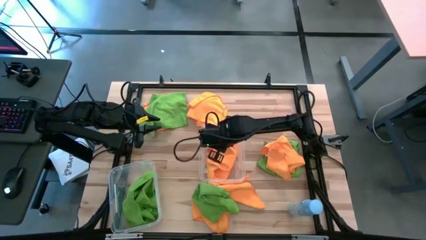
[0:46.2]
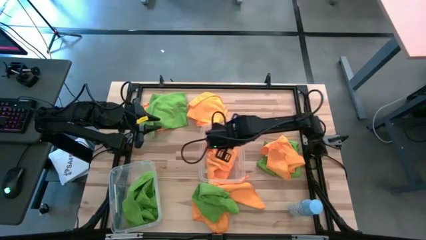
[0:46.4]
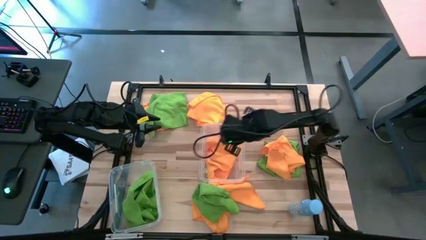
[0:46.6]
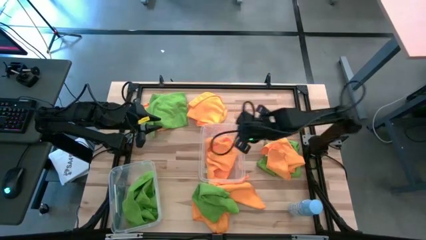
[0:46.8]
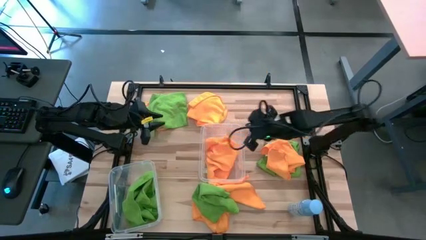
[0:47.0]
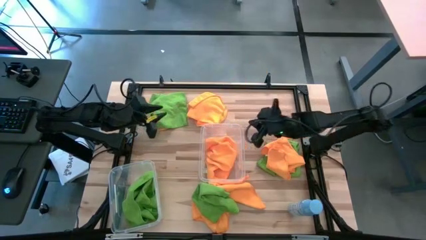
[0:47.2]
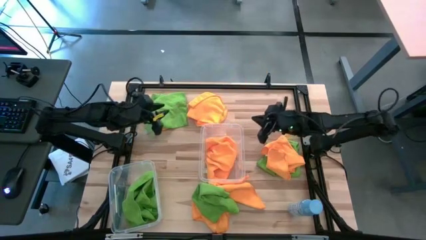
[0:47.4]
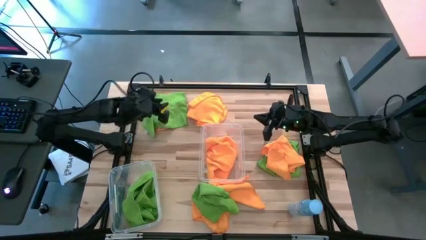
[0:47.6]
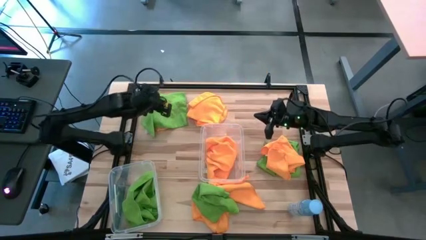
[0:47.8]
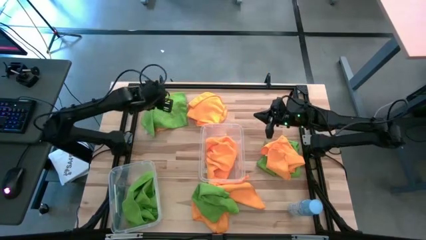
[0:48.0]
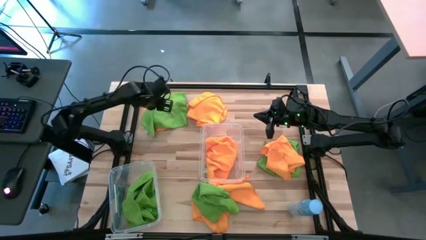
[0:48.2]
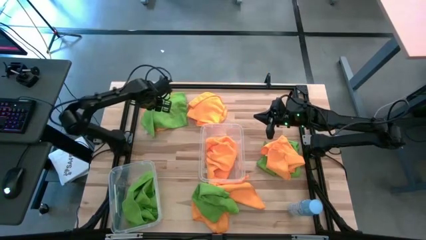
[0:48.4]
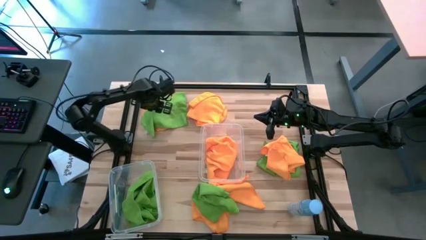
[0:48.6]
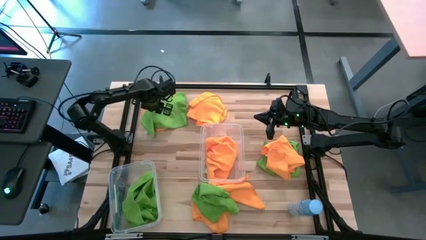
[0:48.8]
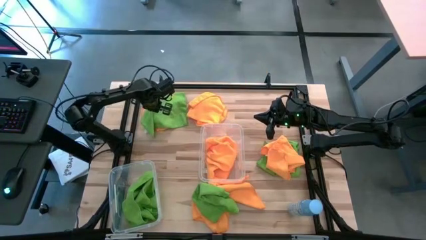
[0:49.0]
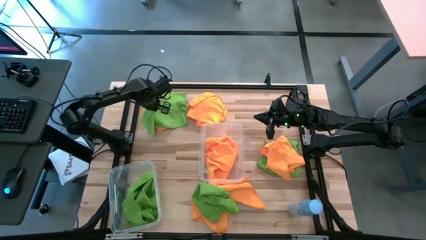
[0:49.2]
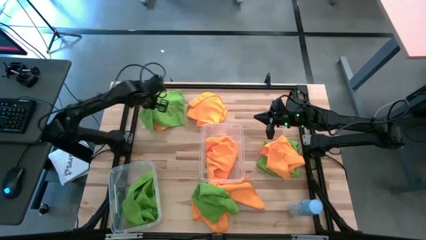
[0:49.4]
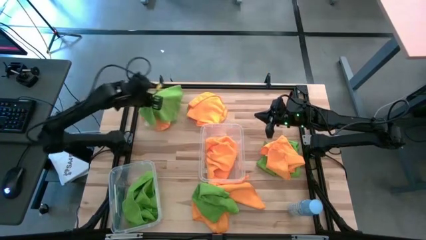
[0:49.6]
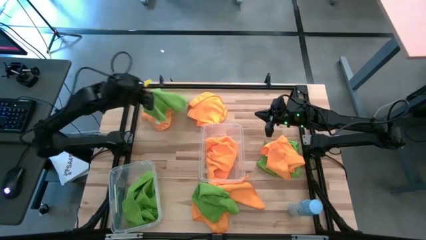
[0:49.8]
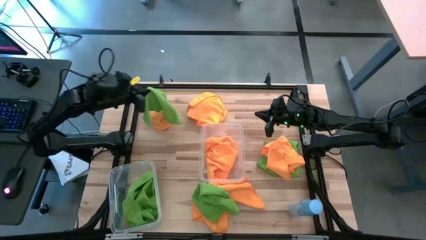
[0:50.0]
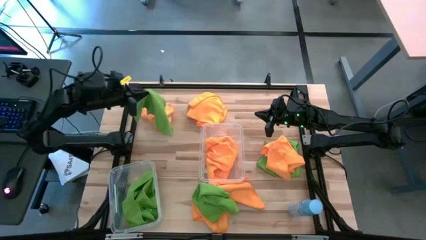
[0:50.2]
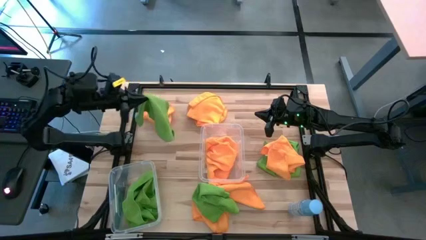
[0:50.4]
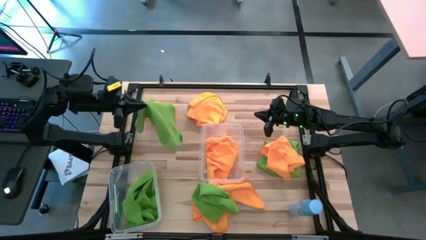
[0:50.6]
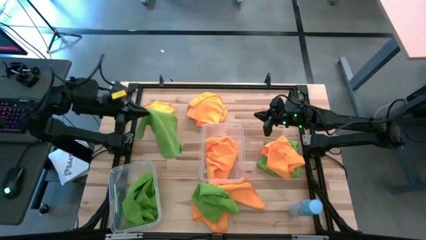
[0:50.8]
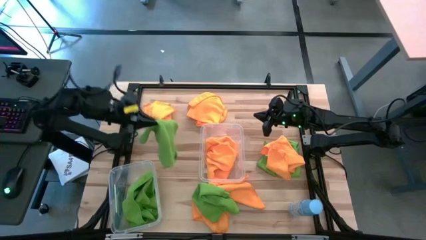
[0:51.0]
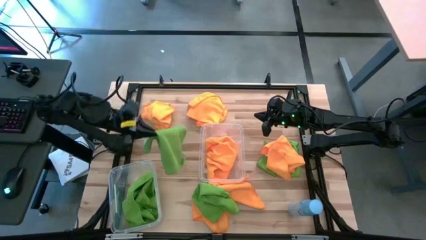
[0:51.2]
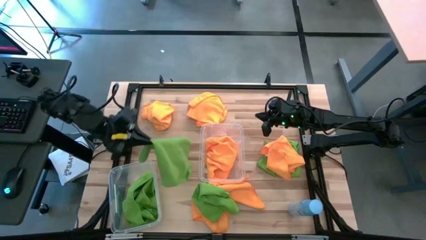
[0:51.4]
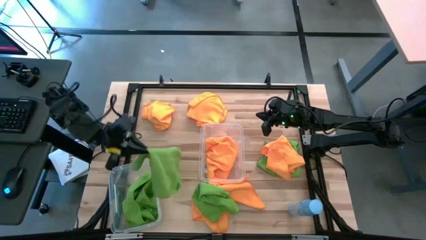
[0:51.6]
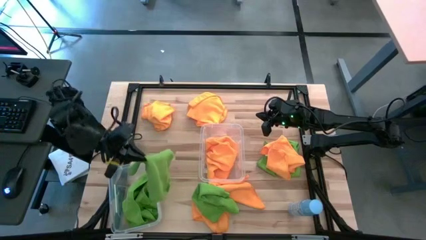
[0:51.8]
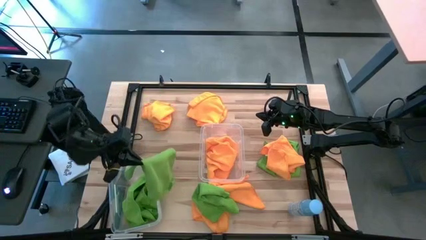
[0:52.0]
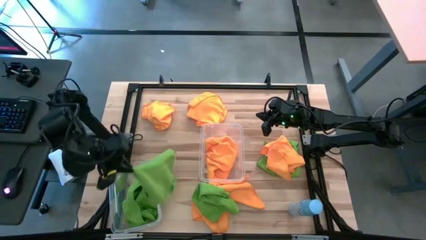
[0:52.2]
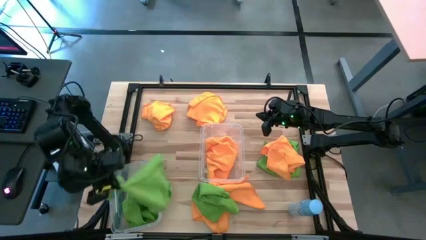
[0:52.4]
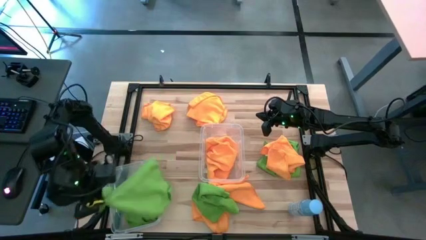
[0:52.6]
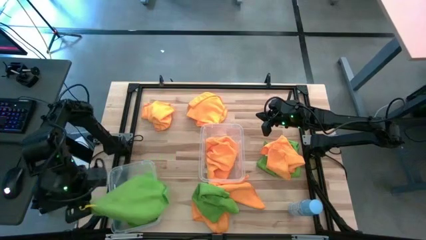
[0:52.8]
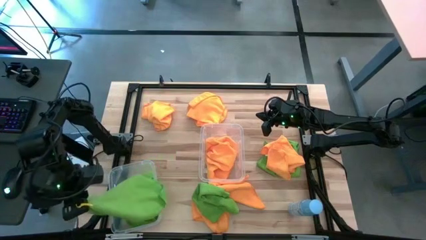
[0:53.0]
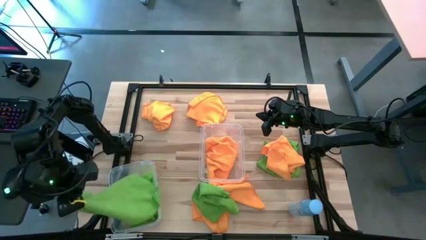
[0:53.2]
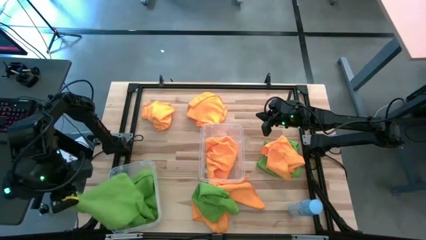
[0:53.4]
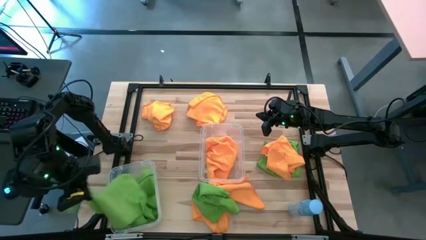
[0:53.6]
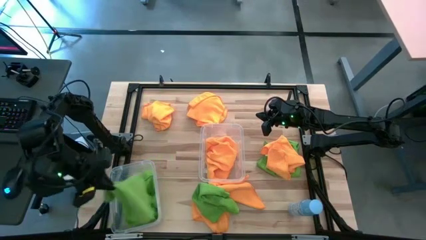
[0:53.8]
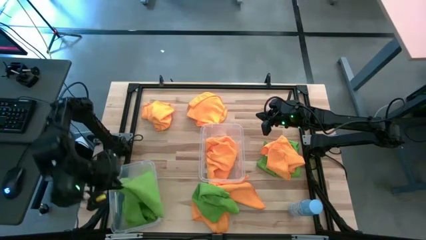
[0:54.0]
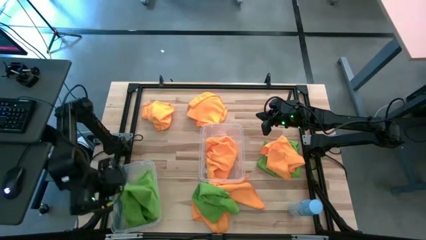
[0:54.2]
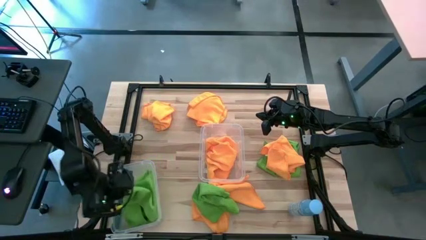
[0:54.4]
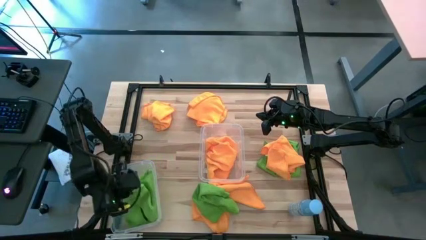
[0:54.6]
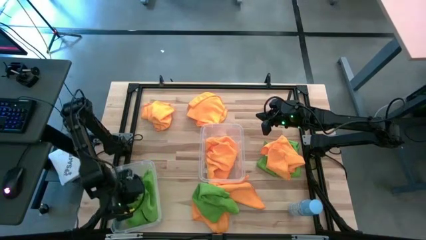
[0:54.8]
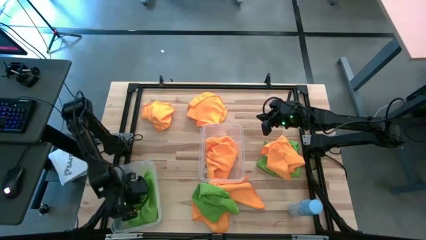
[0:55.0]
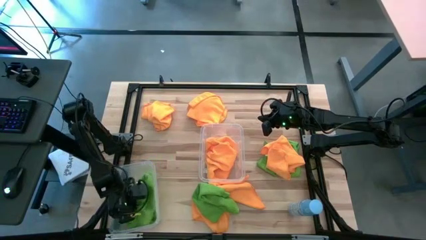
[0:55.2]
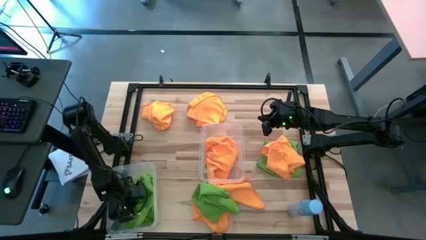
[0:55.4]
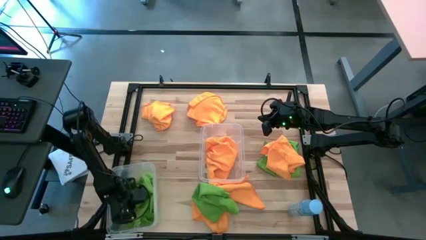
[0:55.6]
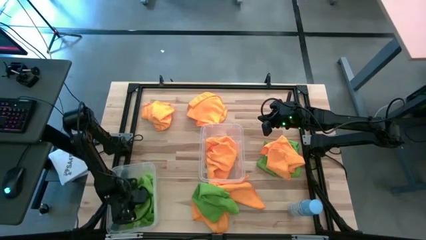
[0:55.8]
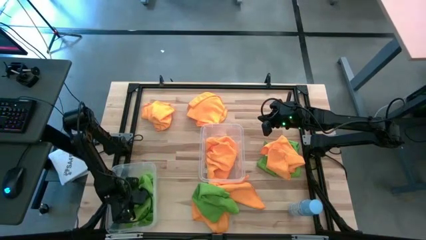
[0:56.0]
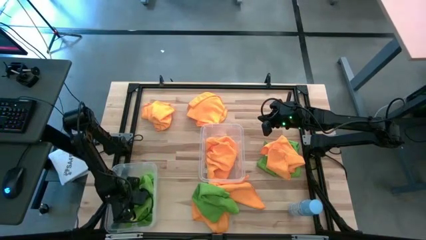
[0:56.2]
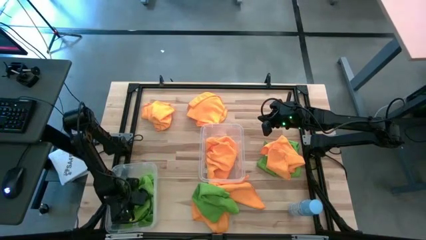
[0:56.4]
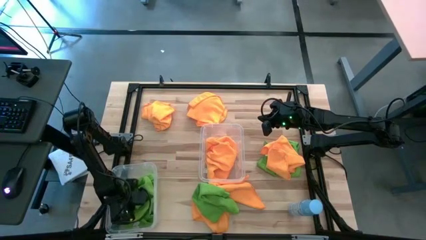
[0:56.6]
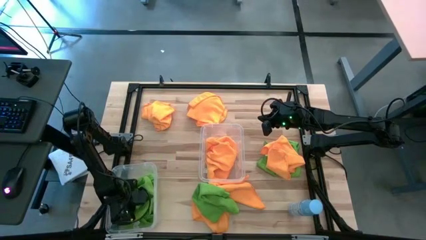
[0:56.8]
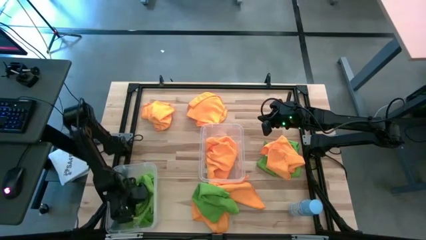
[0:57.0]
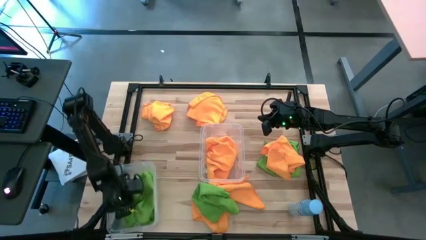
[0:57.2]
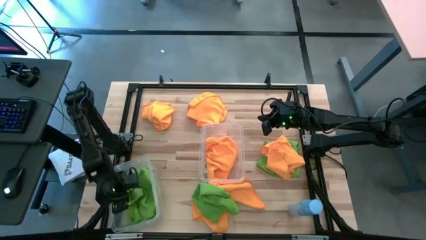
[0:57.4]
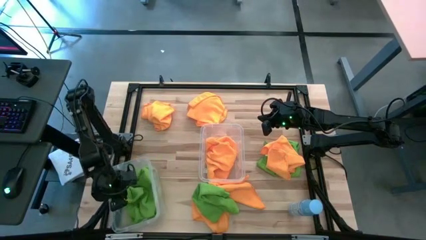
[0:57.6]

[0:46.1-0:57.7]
Task: Sort microfiber towel by color & place in baskets
Put the top green microfiber cloth into the left transparent bin

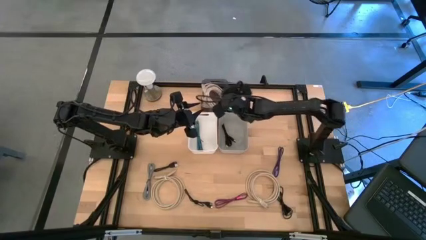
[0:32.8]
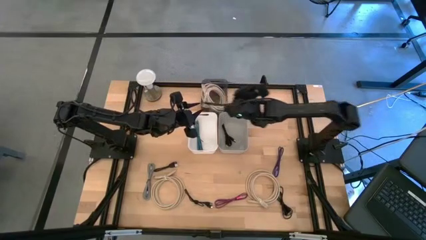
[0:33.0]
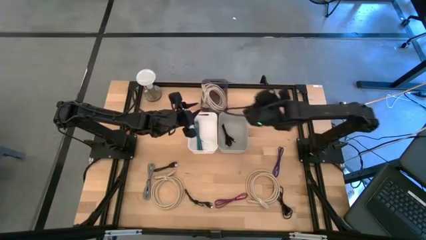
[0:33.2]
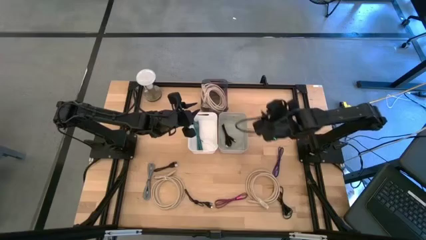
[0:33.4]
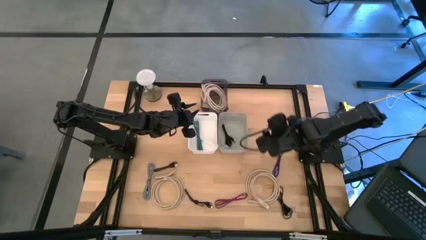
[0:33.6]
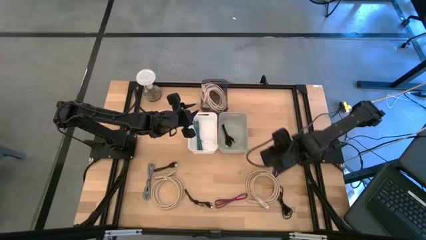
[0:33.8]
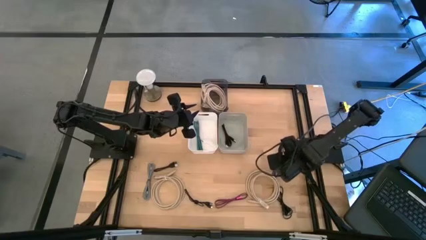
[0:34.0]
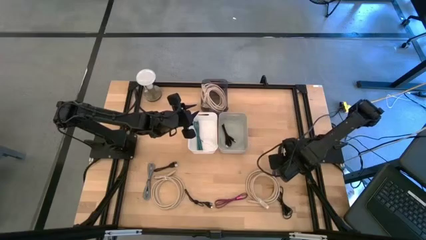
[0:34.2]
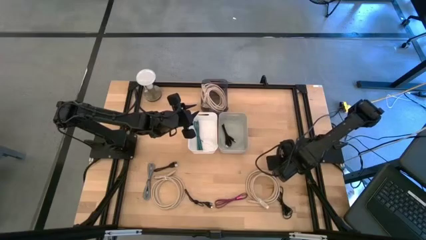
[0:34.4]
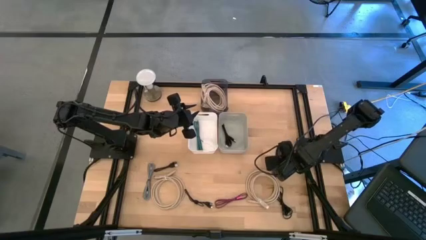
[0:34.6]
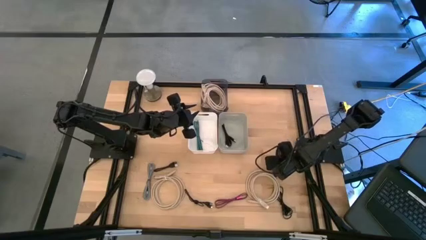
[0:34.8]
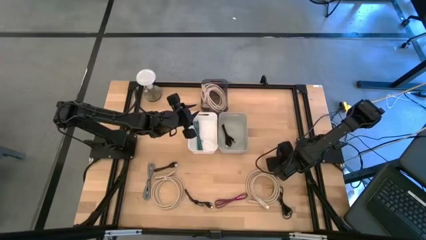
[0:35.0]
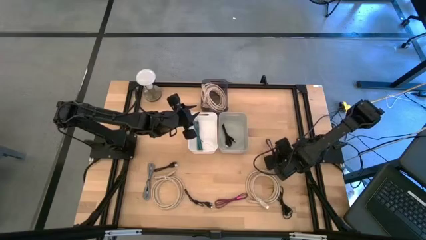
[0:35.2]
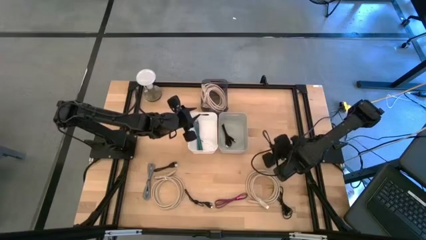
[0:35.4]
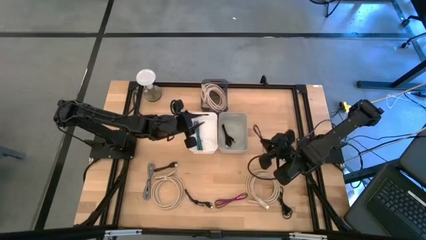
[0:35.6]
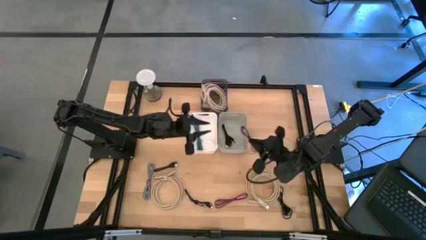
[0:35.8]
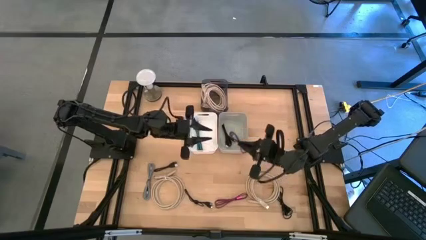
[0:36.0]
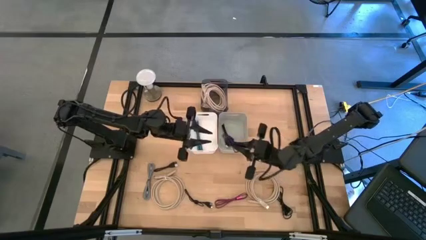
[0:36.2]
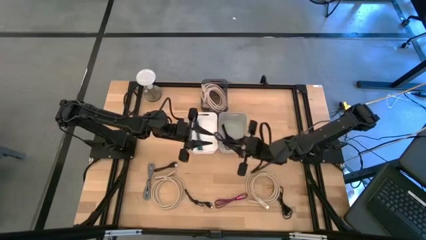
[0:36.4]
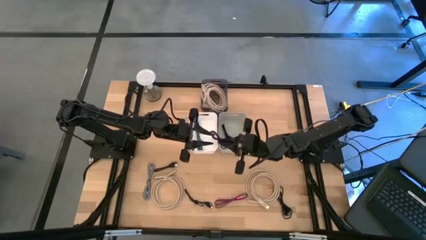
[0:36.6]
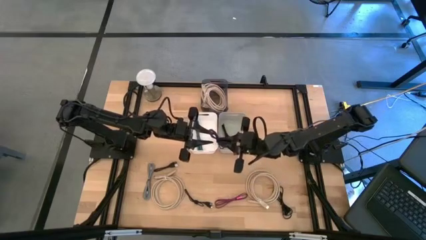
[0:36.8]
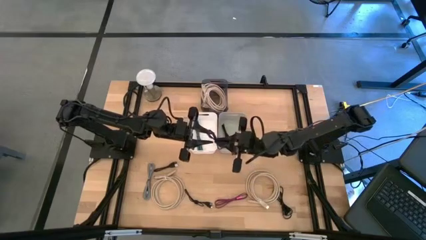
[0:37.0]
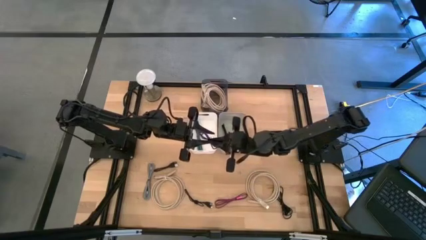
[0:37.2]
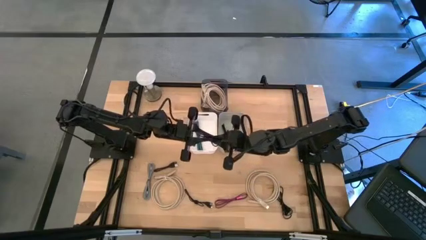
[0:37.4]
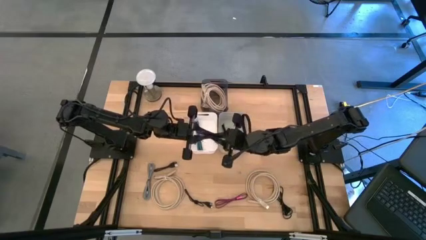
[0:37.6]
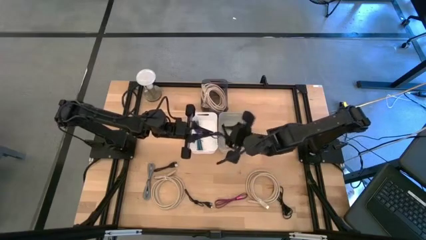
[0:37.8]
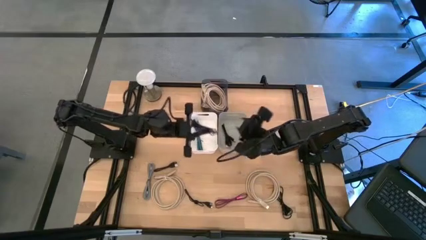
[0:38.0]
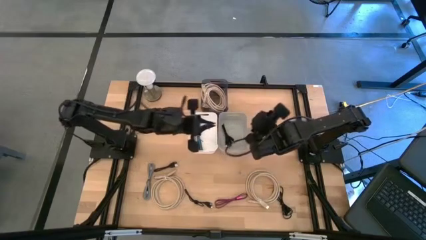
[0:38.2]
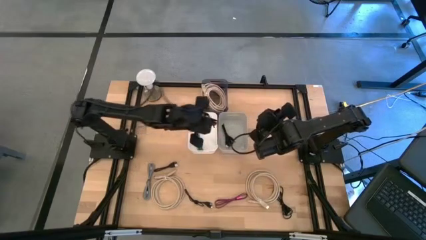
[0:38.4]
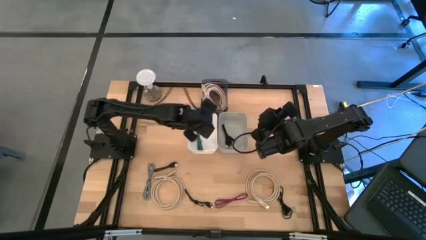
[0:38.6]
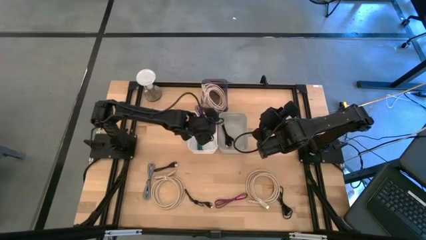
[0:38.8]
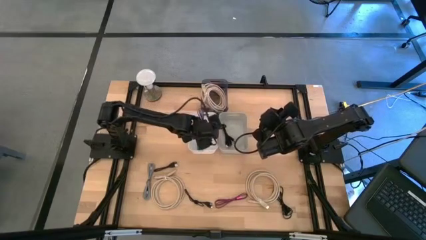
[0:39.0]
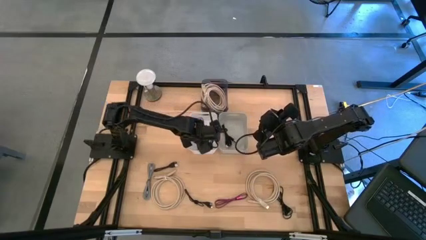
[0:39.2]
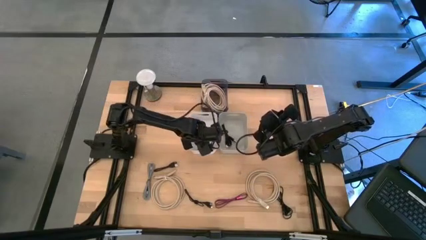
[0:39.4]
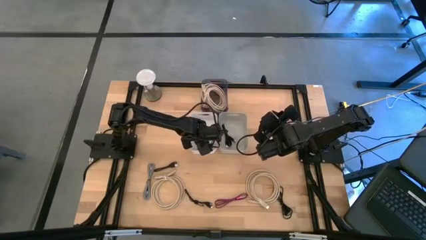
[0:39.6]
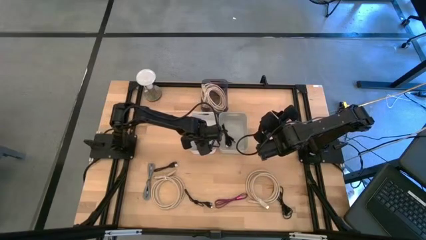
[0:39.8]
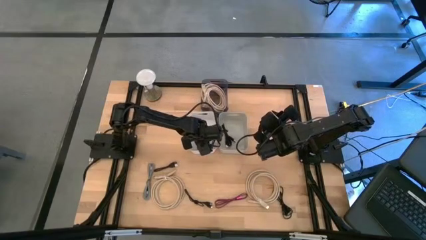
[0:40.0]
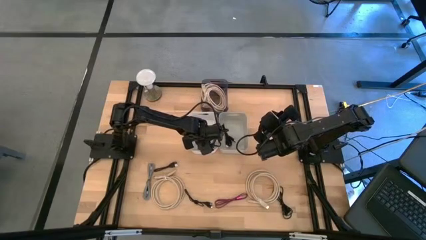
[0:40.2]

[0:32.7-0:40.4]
Task: Pick & Place USB Port
Put the purple and black charger cable into the white bin
